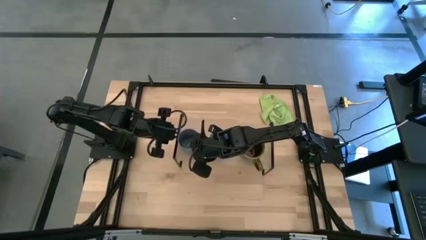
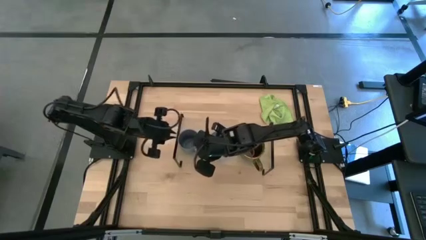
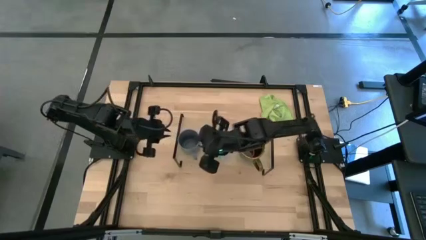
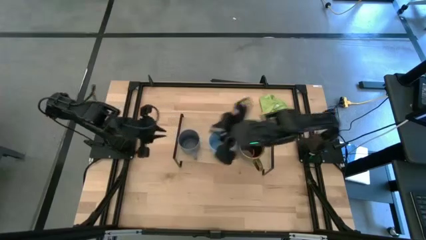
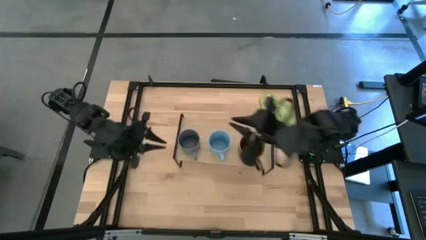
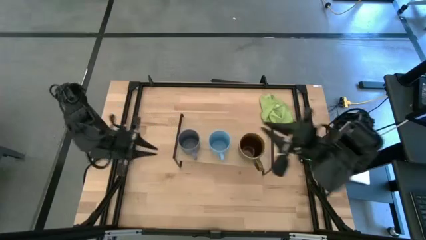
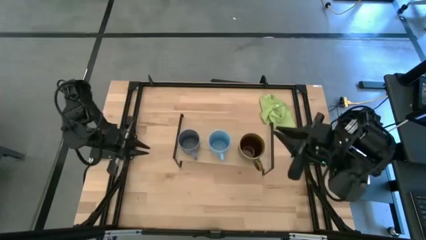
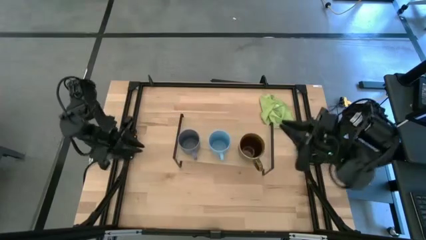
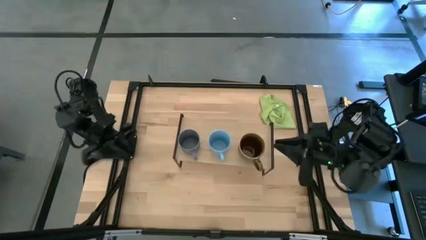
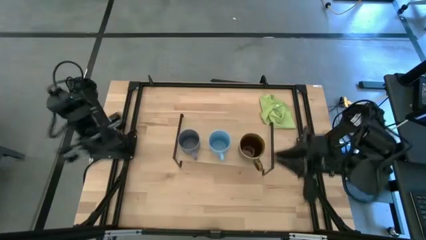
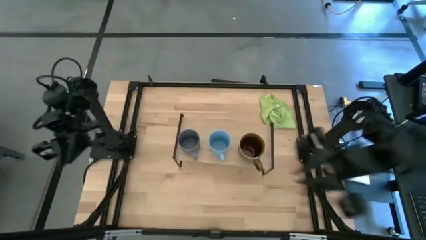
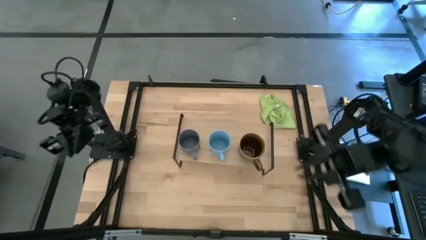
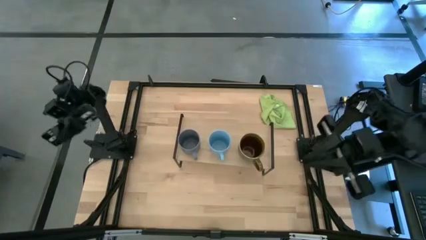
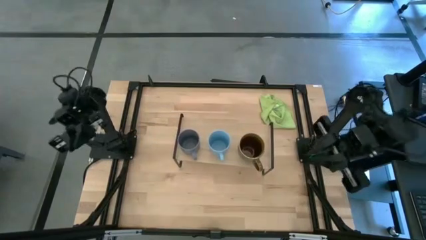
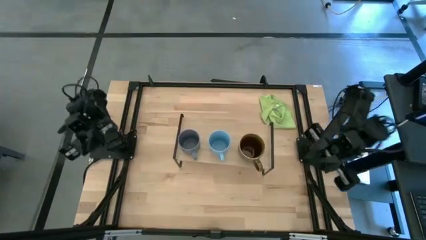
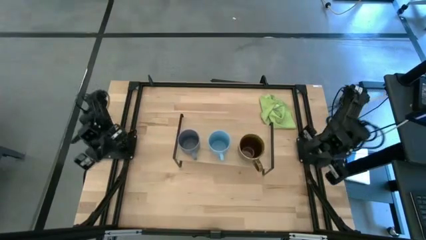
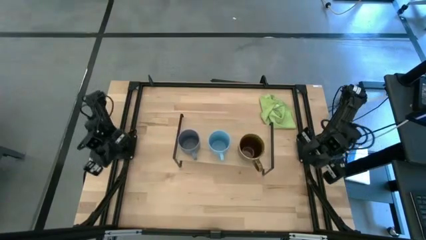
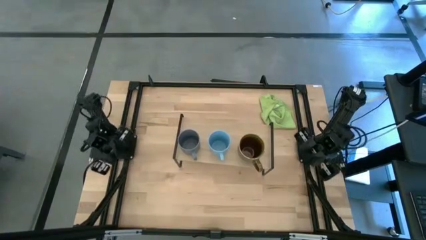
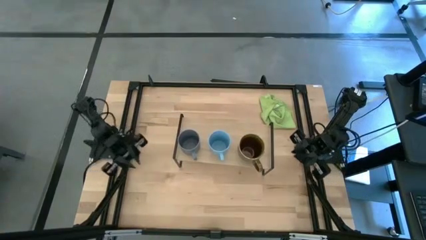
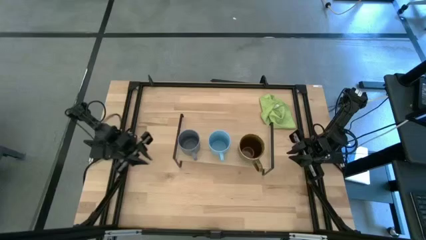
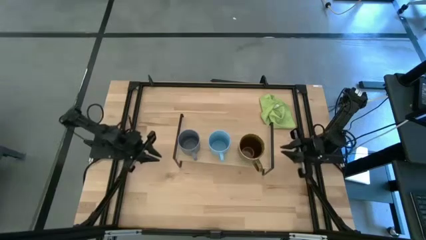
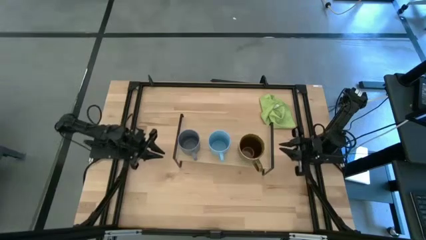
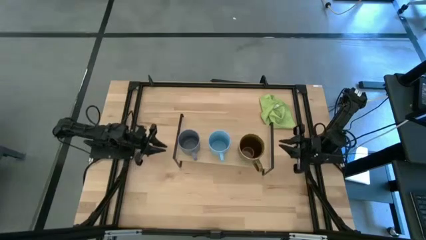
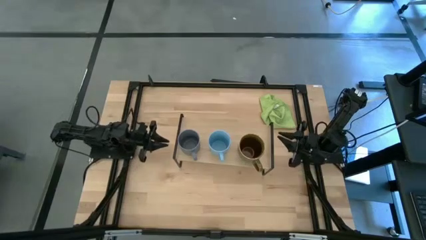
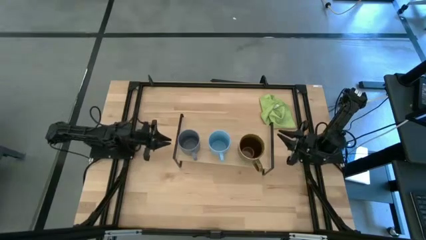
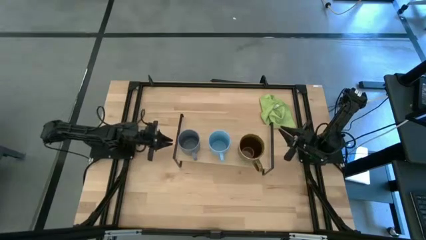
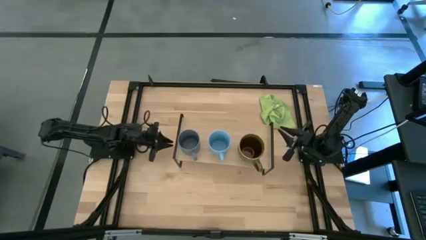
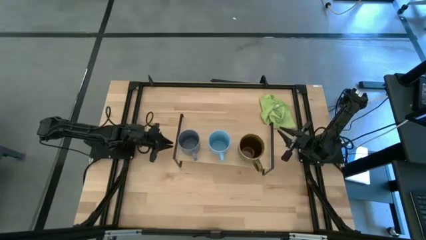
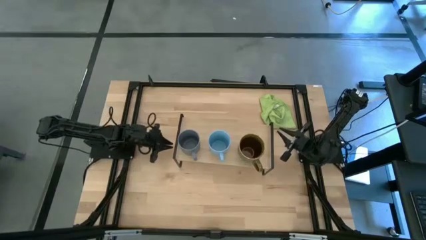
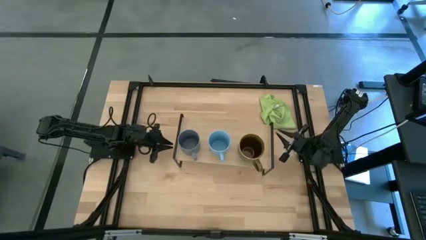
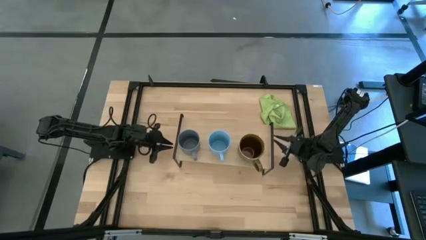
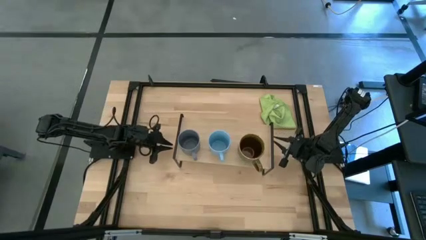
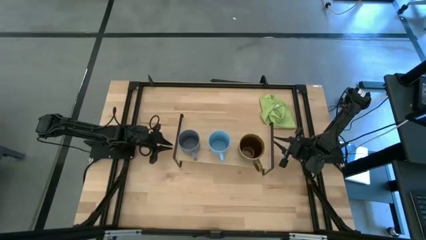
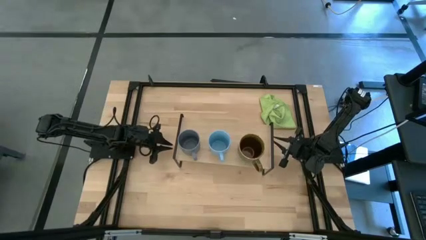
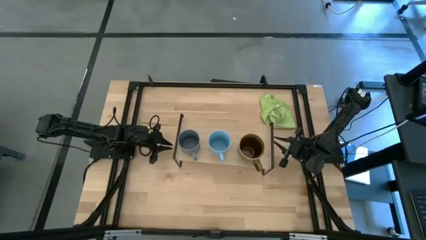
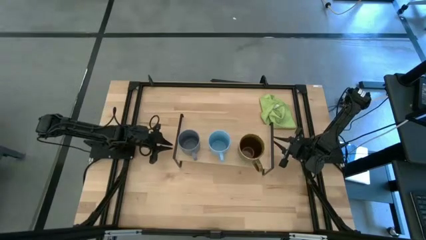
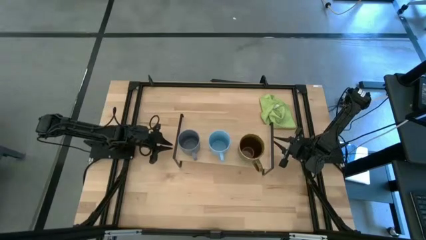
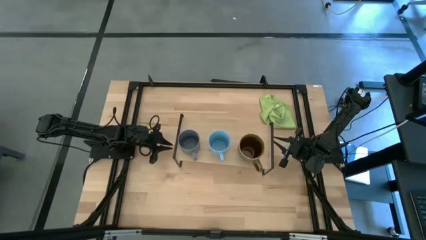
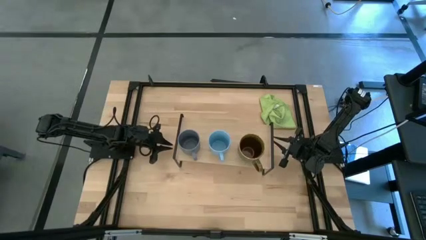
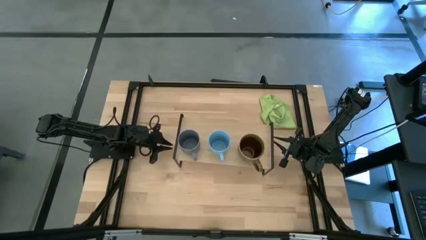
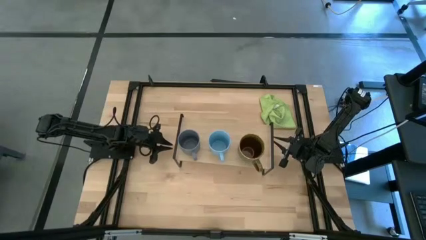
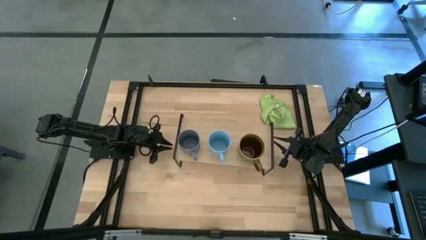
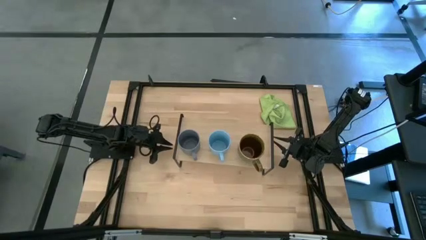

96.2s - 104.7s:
Task: Stack small to large cups/mugs on shelf
Return to Home Position

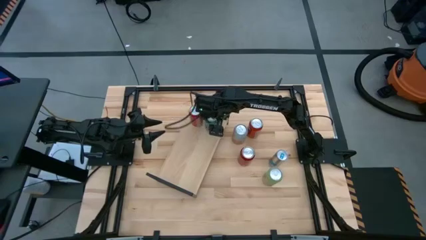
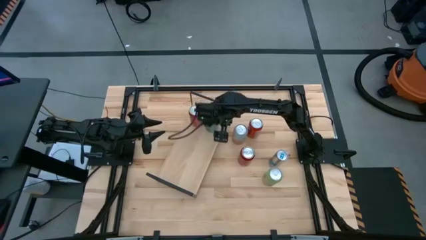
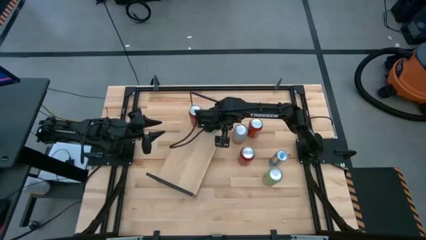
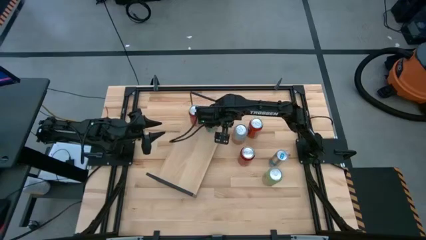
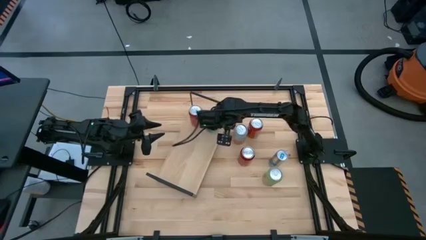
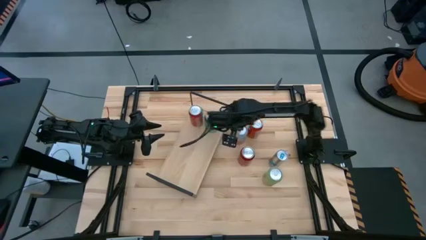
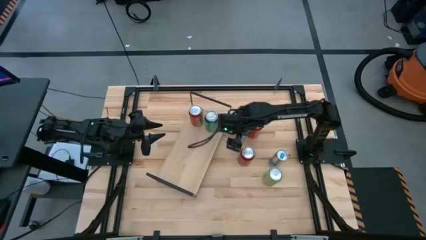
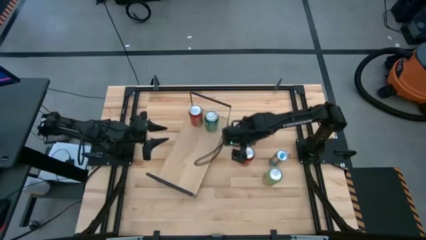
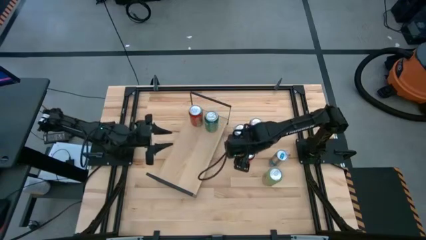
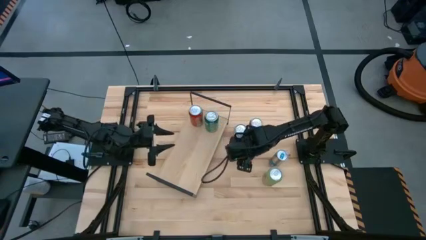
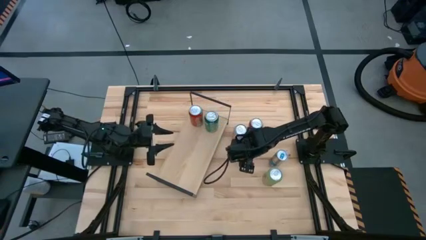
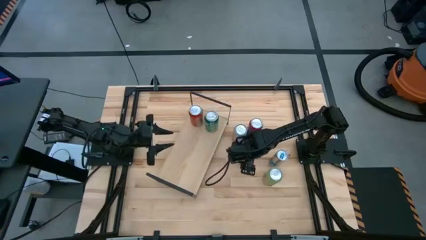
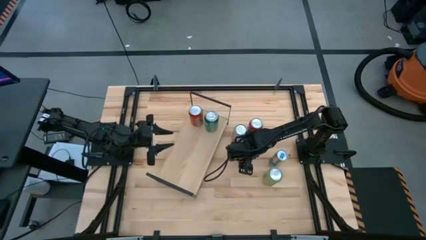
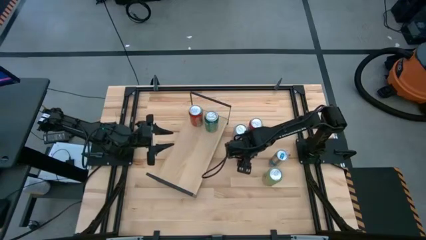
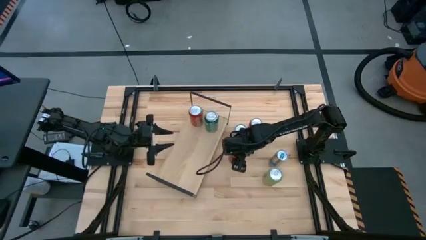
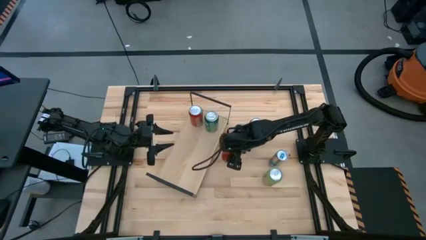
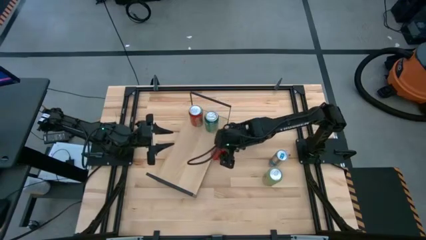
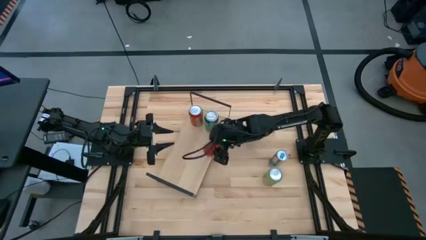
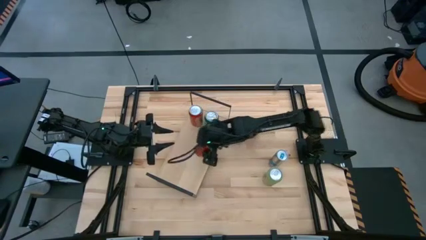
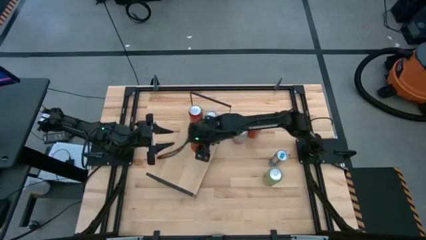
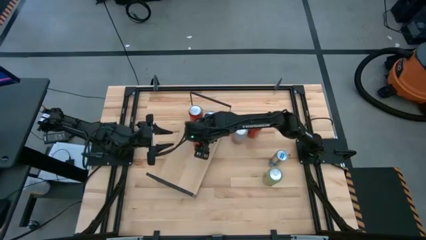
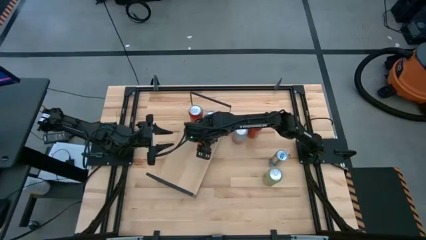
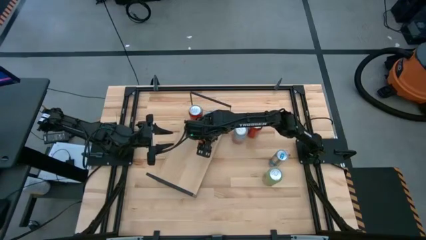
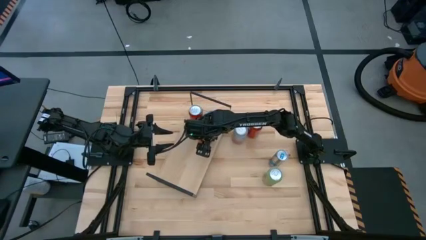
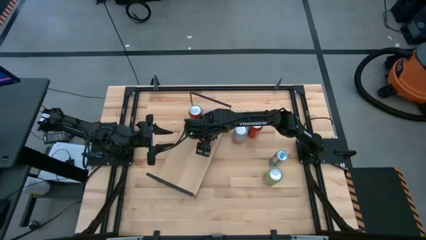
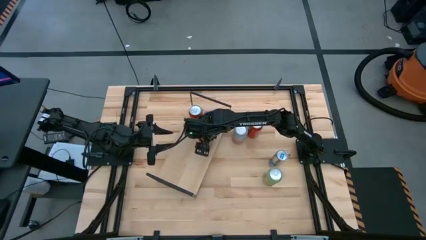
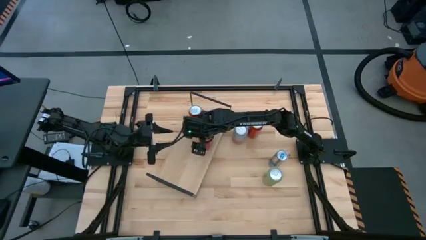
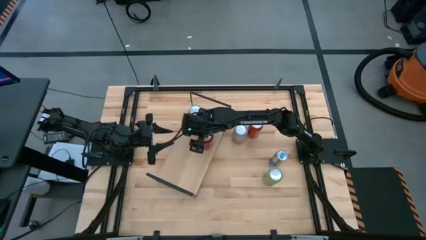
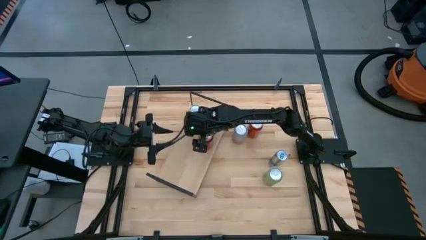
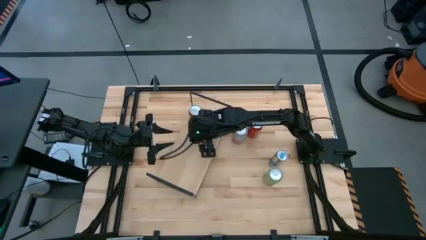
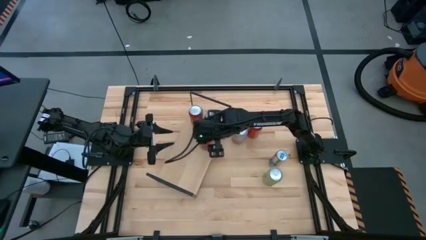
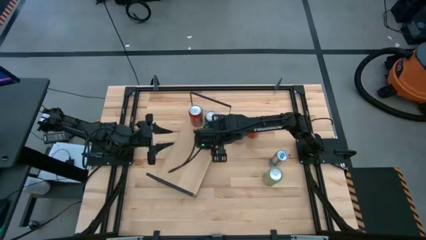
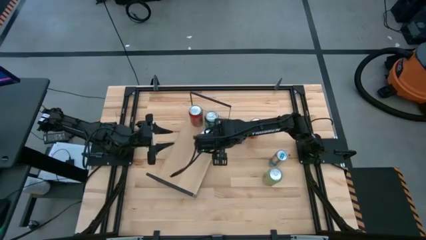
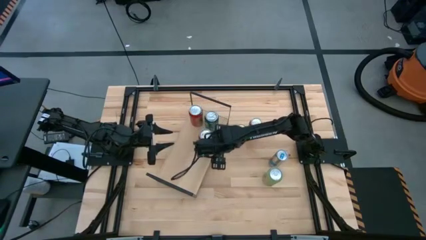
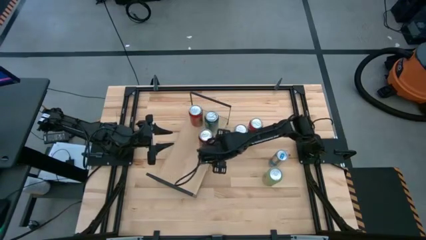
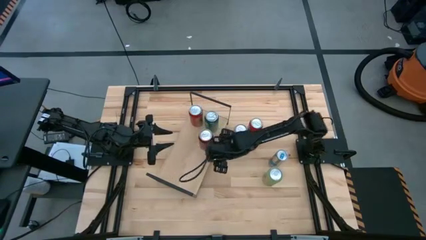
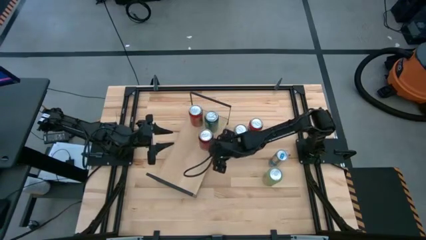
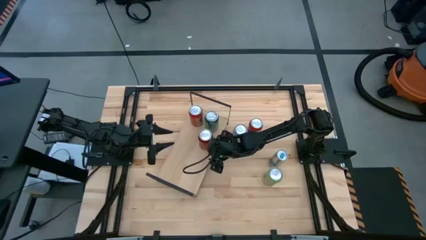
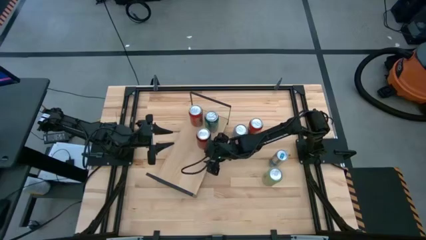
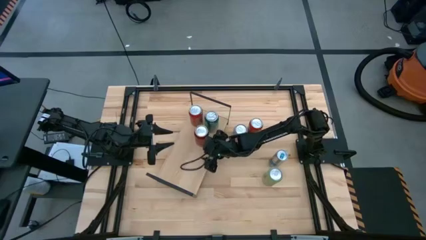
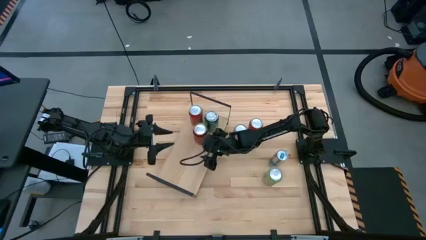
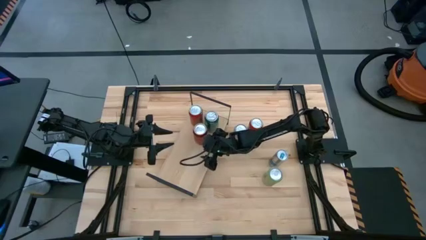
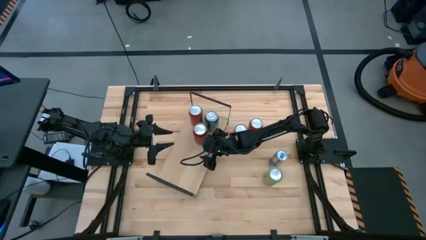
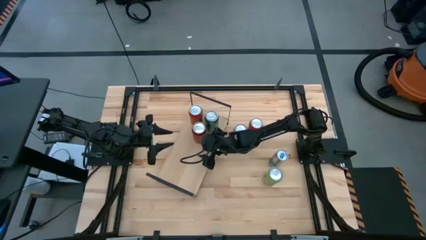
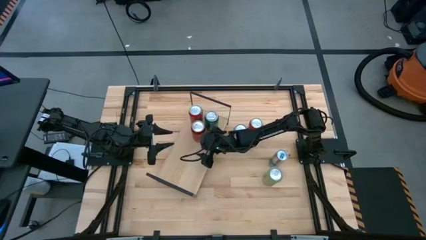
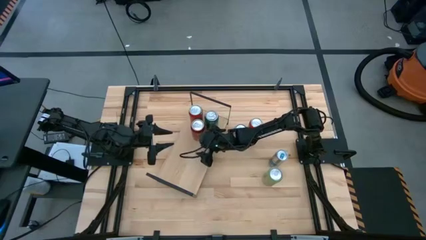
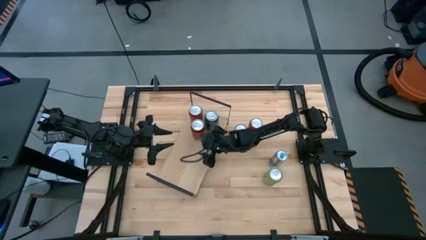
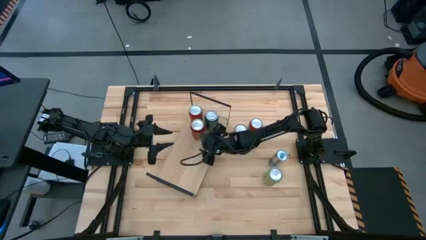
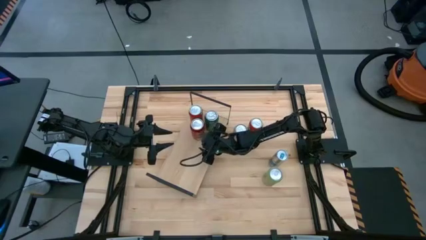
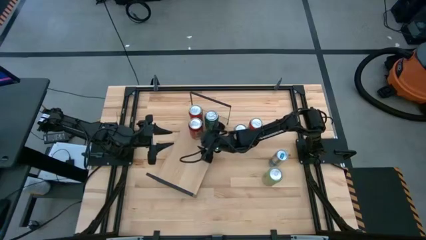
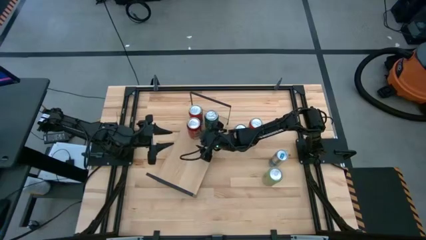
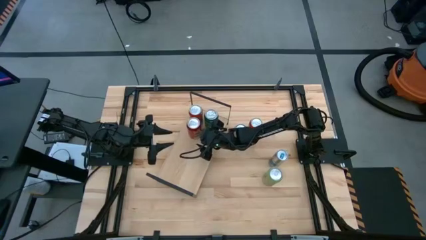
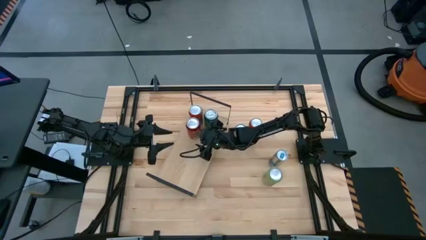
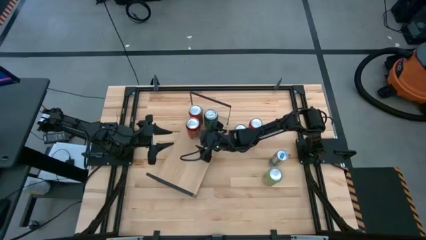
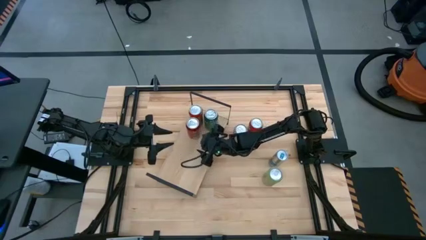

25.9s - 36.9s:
Task: Place canned beverage on shelf
Put the red soda can on the shelf
